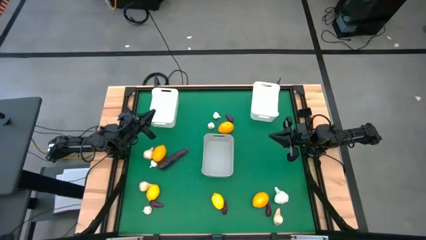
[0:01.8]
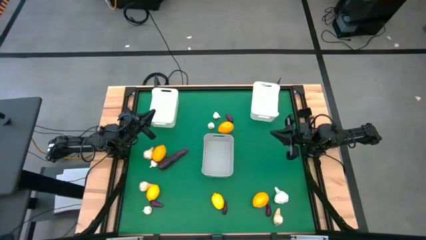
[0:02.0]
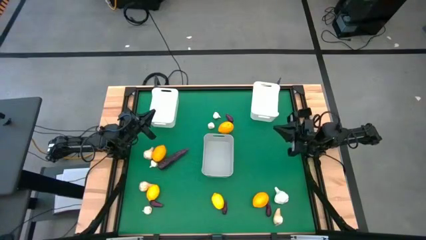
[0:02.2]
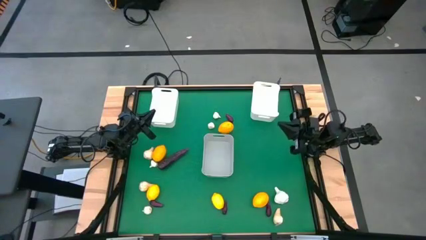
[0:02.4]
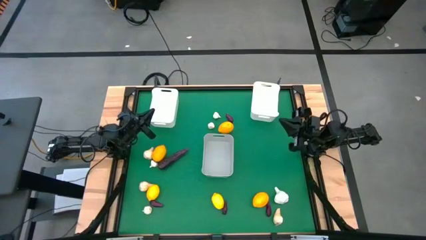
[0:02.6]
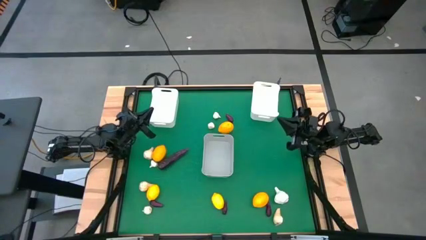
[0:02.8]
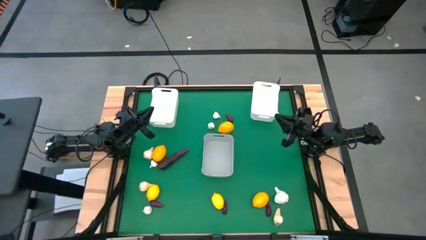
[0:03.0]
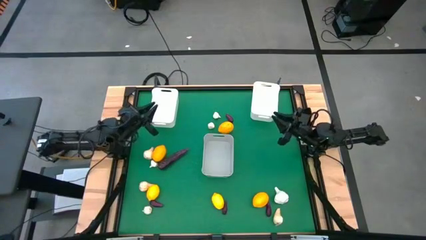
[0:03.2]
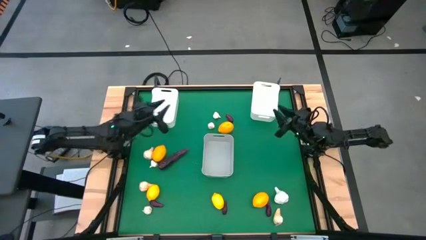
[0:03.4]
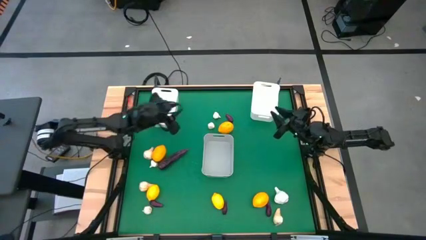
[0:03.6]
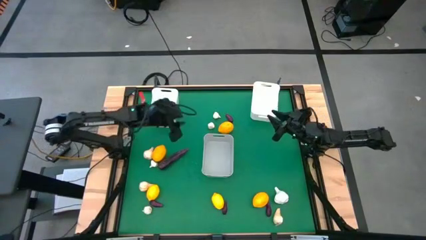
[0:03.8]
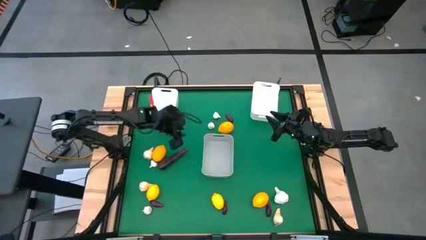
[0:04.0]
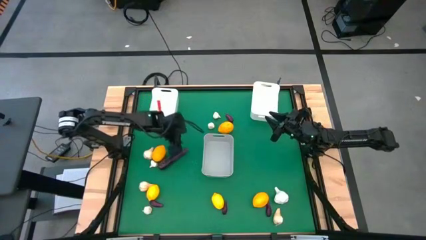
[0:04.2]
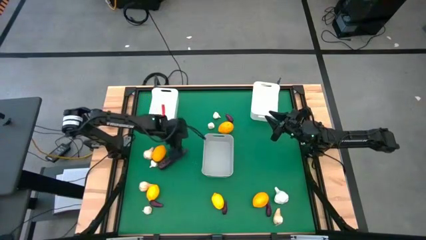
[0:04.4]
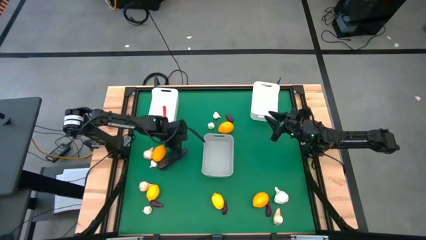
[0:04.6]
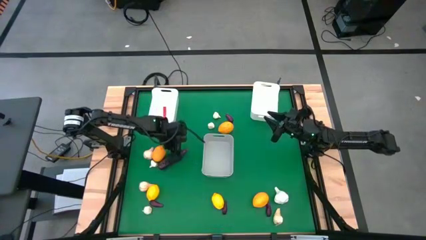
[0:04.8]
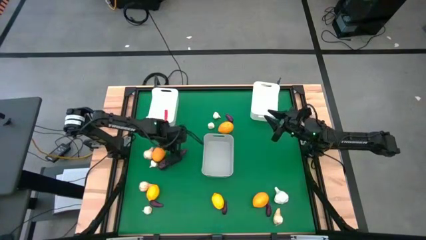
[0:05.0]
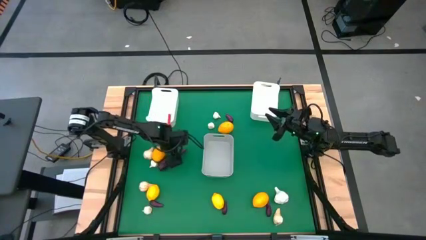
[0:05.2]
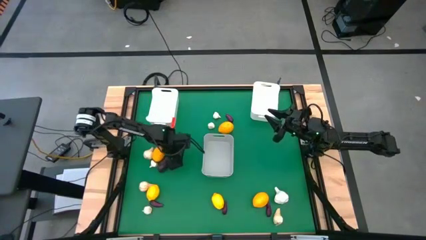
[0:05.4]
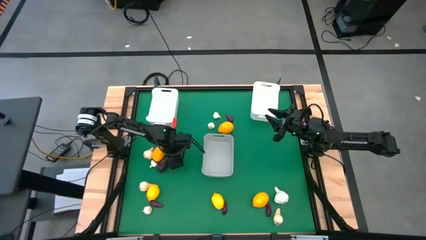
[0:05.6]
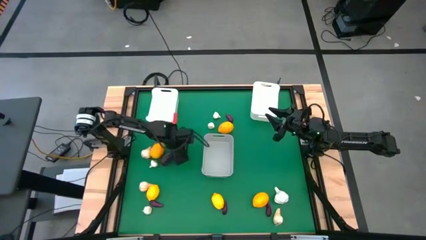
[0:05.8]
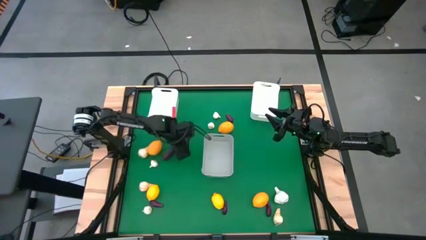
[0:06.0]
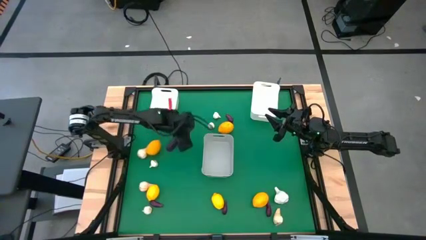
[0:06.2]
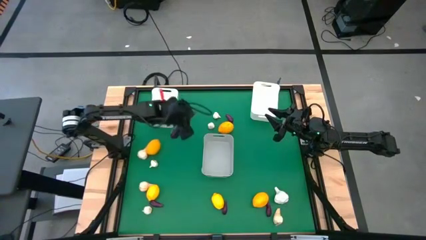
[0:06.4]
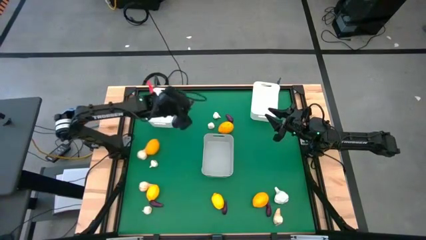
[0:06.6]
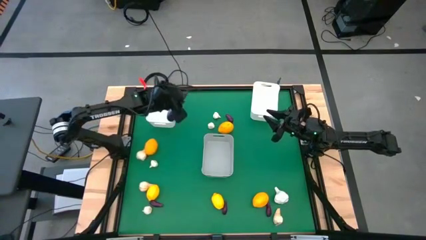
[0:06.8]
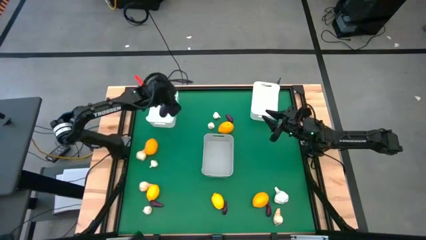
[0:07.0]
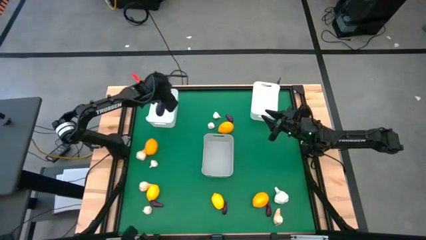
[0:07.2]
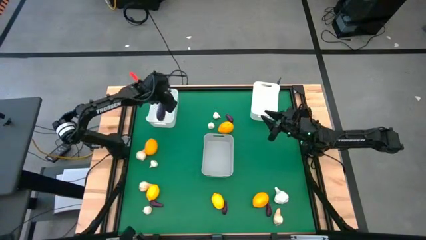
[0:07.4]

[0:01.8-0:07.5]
Task: Sort produce into baskets
Put the eggplant into the left white bin

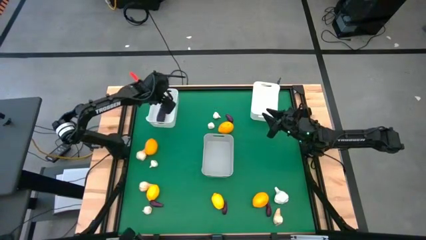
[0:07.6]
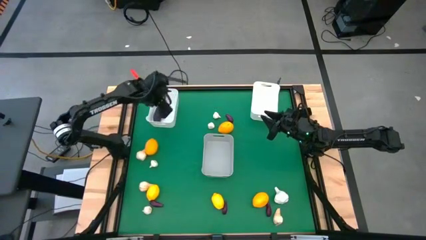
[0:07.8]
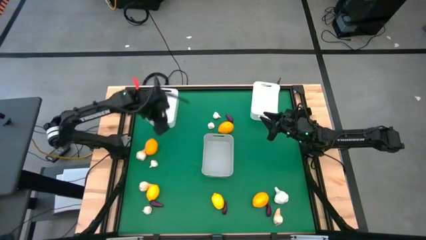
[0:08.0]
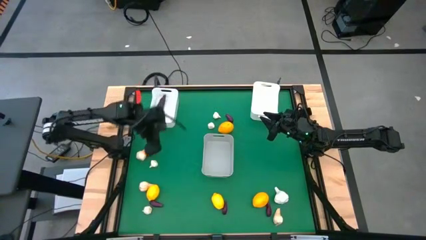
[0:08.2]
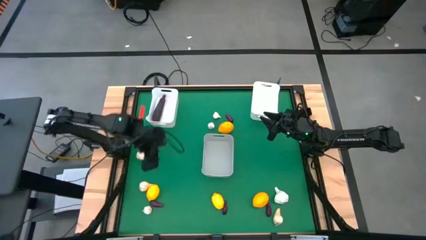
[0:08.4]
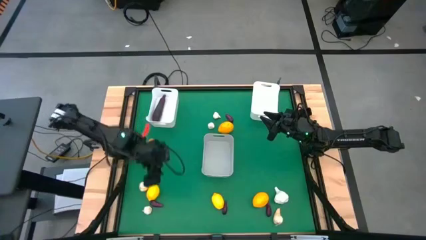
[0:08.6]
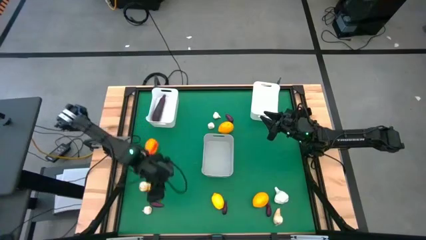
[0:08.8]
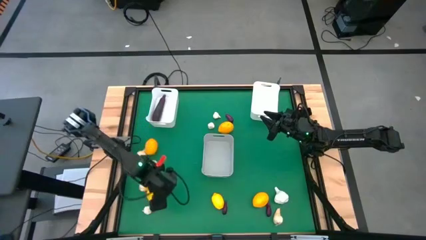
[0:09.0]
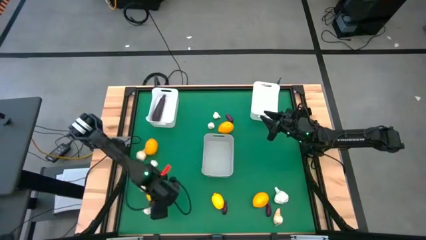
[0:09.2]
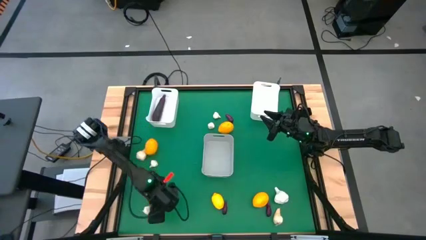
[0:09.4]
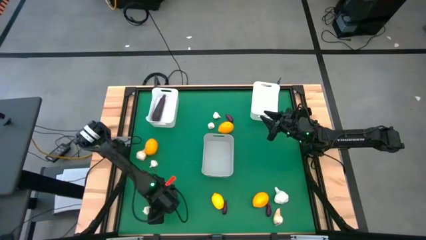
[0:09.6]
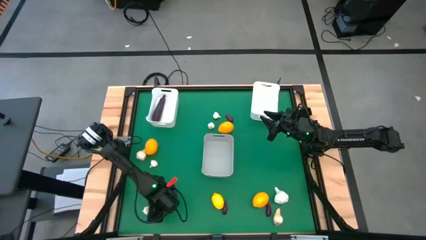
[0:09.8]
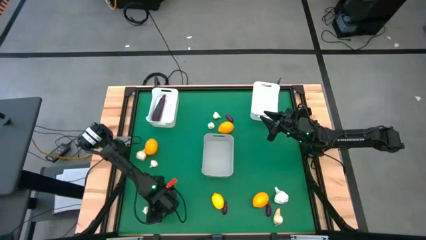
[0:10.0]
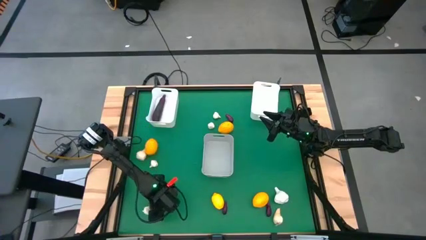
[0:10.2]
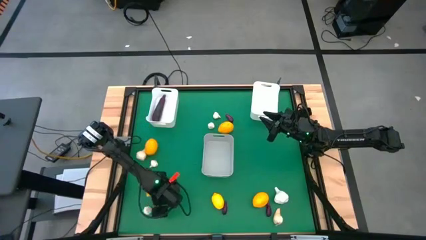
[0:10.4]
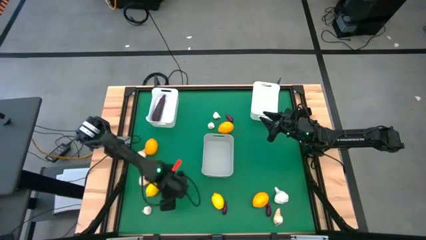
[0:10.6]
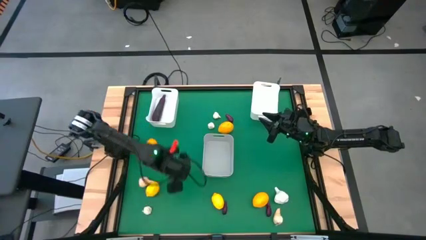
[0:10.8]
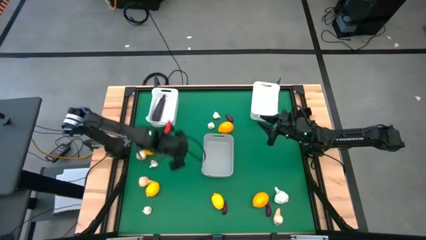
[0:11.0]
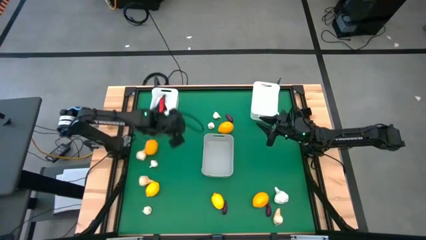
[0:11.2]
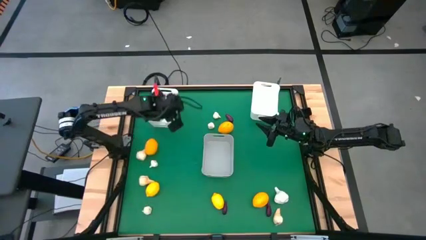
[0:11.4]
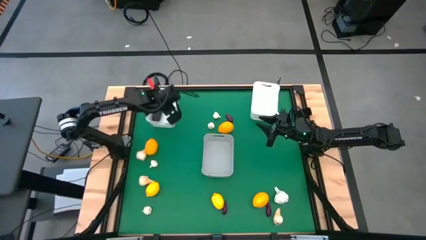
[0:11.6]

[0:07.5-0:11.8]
Put the eggplant into the left white bin

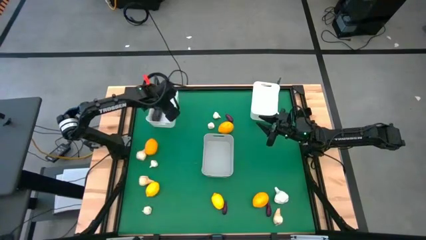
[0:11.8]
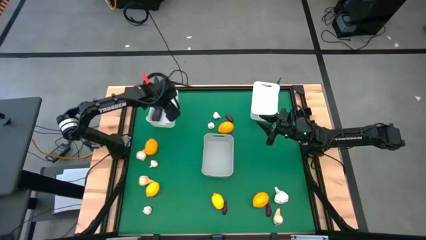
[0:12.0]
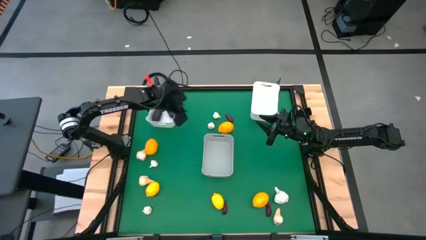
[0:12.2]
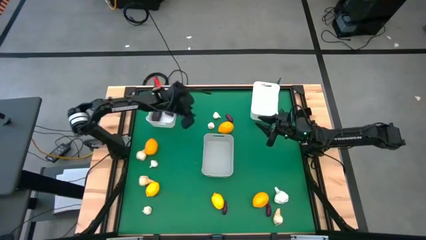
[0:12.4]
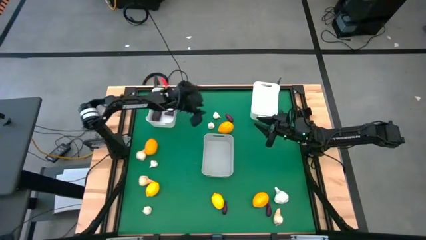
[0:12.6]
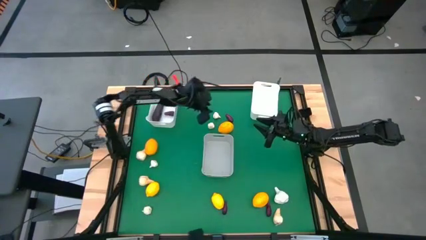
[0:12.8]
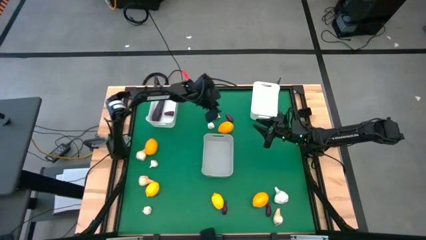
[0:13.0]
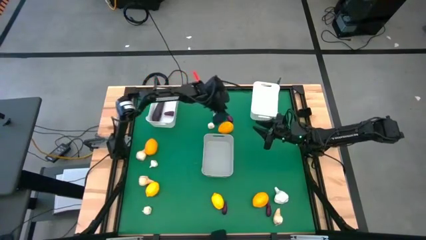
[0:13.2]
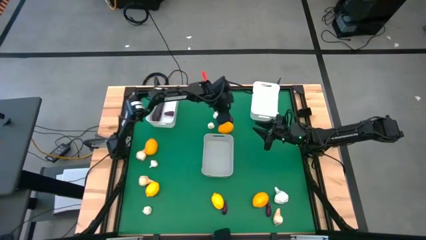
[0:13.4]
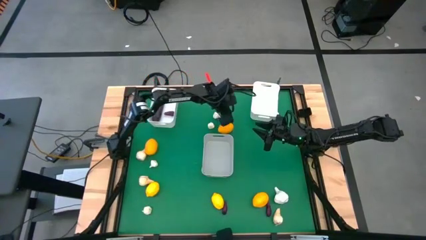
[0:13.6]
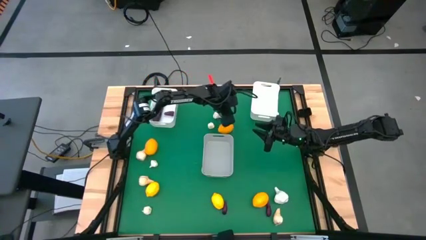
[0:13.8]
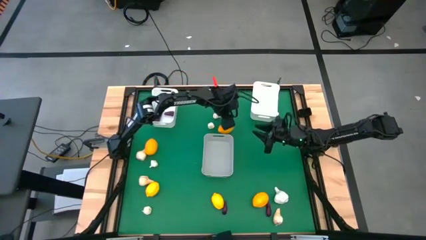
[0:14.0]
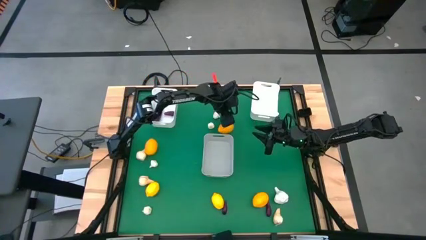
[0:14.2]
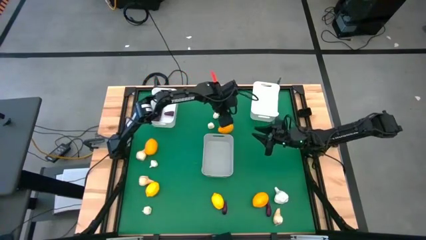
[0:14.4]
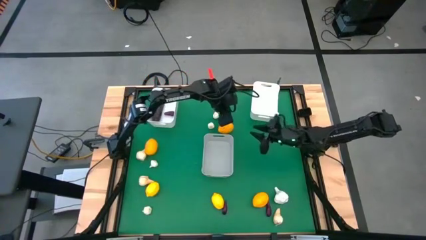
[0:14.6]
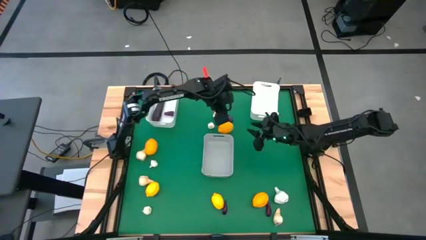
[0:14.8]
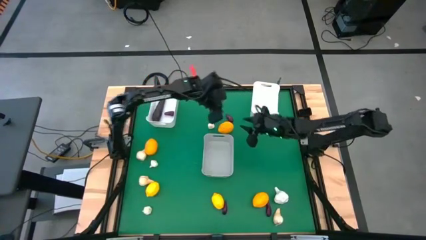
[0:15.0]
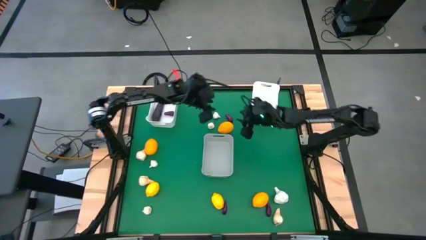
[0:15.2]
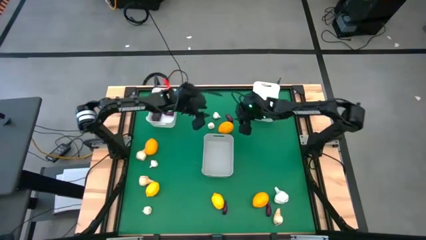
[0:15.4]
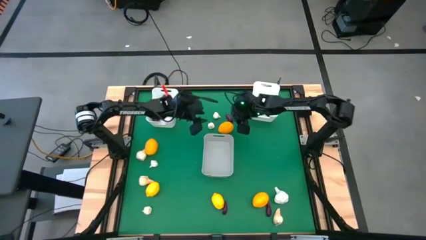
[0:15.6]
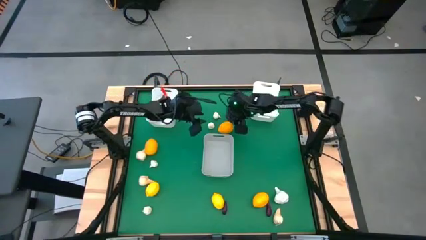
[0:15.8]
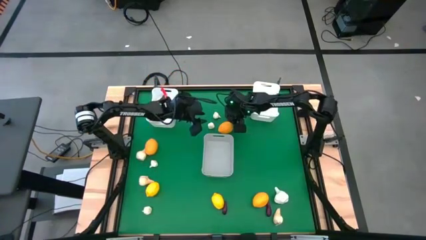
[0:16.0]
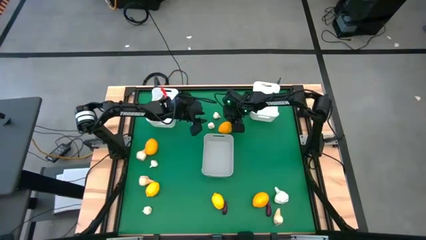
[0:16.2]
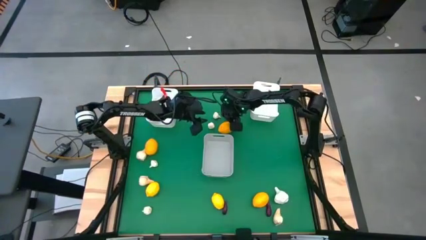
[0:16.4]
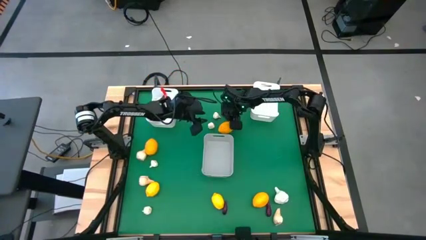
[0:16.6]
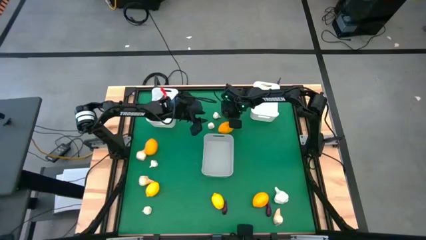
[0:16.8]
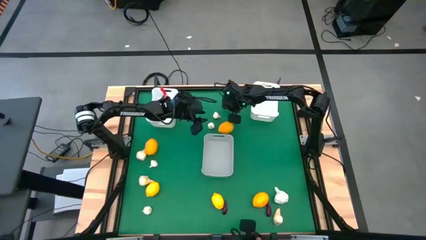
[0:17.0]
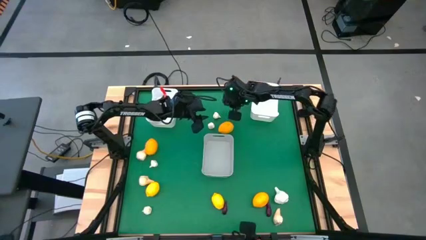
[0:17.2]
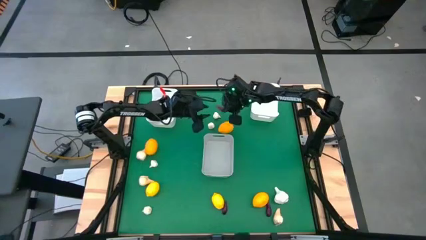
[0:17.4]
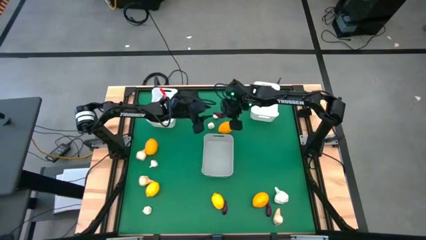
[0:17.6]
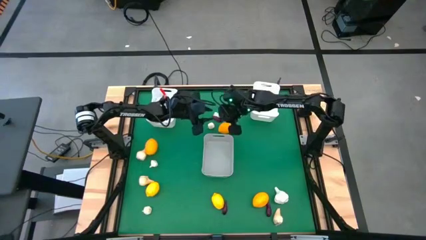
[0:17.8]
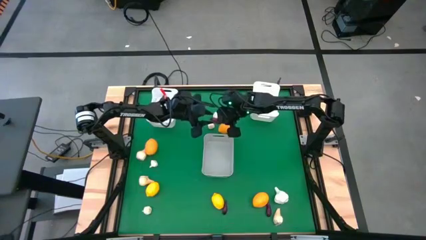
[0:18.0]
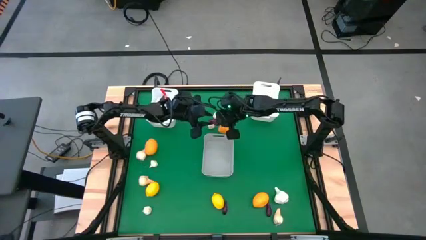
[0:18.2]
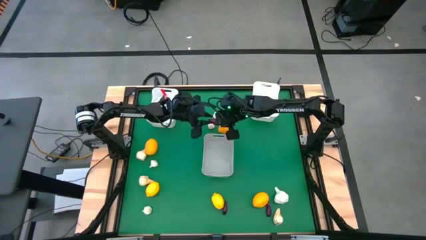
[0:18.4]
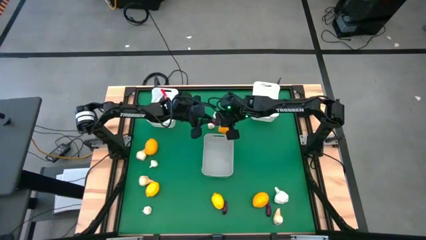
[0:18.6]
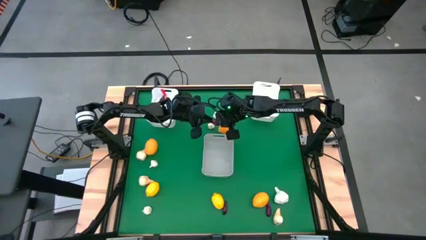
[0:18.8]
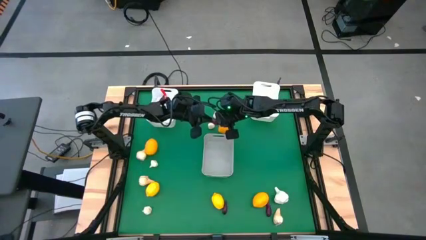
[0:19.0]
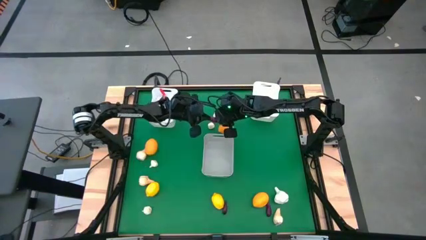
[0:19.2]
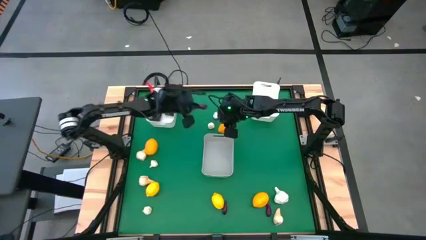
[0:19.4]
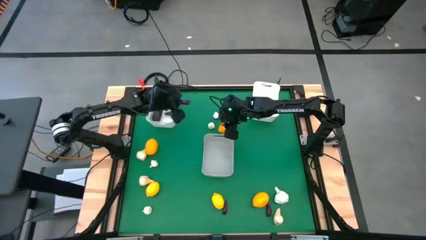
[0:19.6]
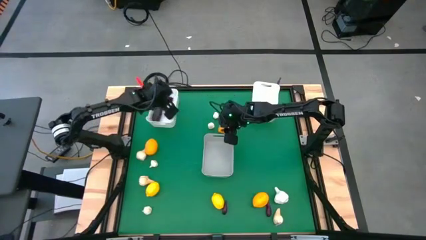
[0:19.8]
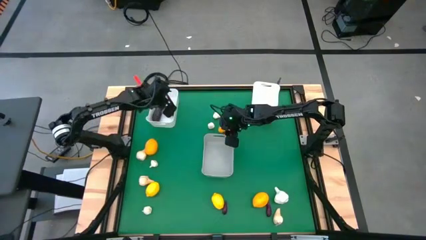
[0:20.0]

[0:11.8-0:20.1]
Put the eggplant into the left white bin
